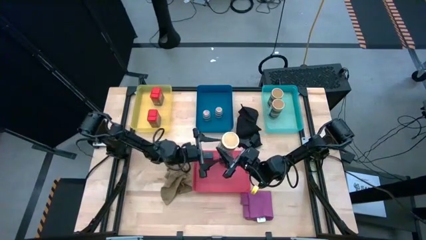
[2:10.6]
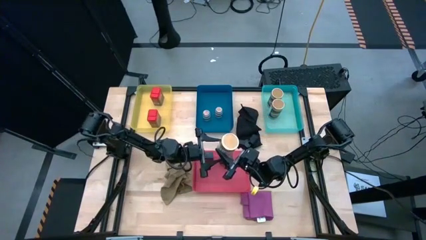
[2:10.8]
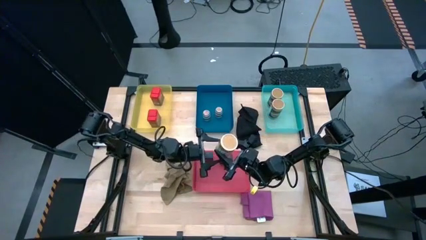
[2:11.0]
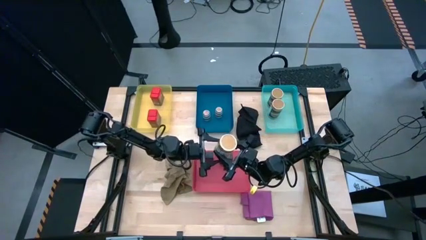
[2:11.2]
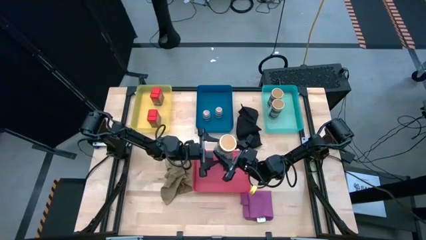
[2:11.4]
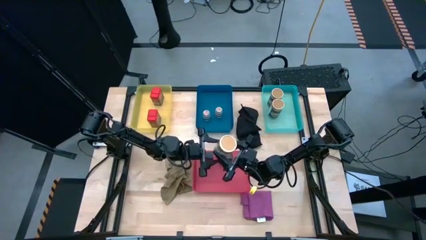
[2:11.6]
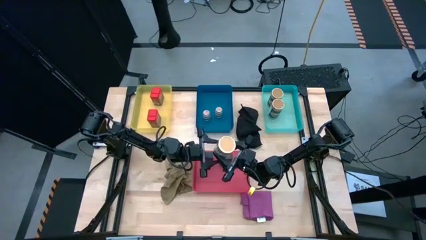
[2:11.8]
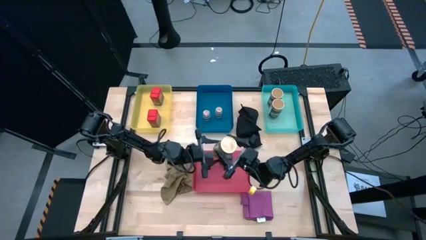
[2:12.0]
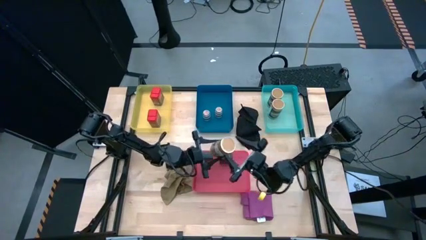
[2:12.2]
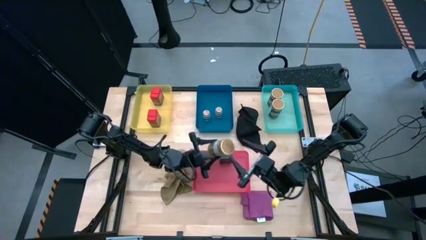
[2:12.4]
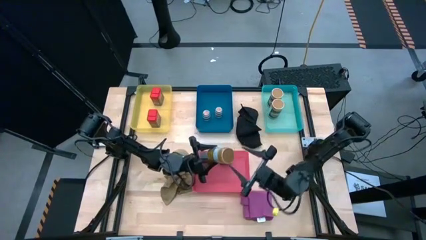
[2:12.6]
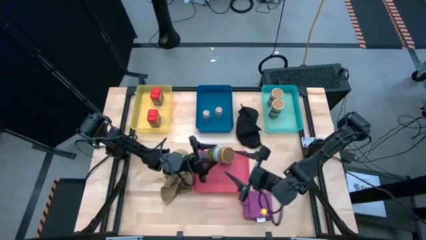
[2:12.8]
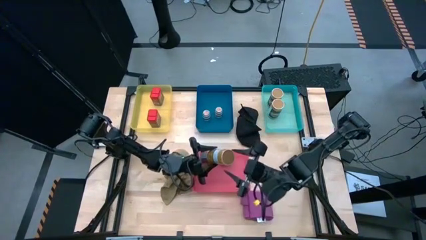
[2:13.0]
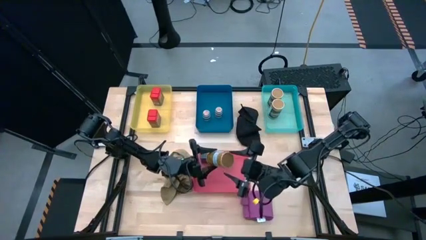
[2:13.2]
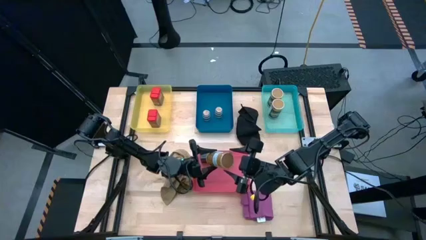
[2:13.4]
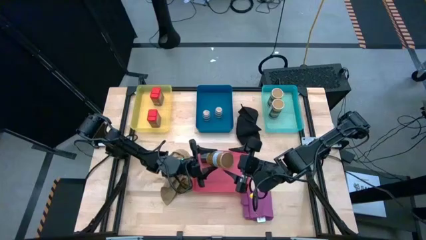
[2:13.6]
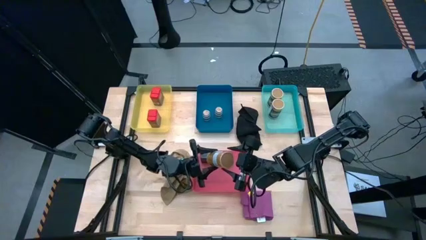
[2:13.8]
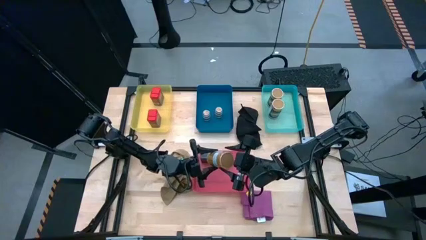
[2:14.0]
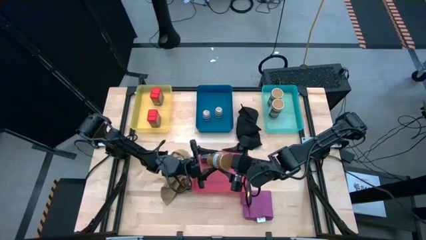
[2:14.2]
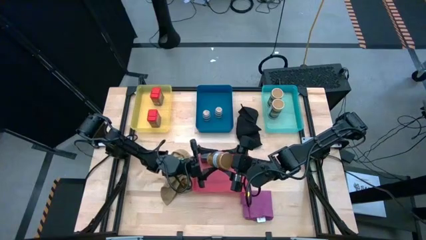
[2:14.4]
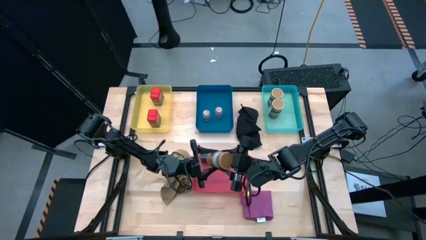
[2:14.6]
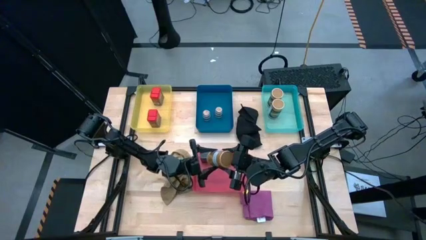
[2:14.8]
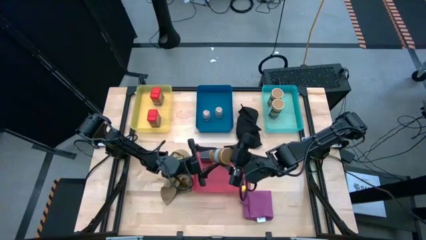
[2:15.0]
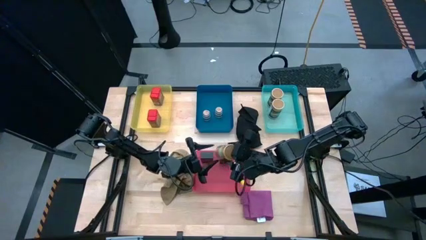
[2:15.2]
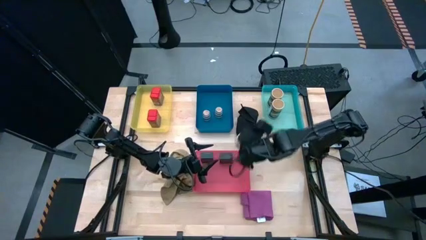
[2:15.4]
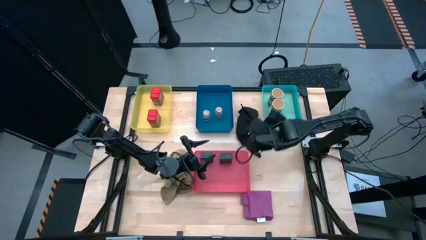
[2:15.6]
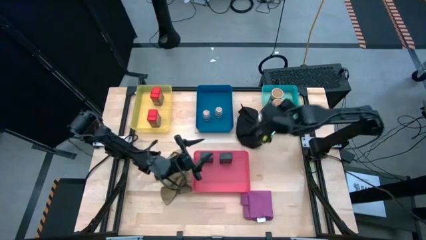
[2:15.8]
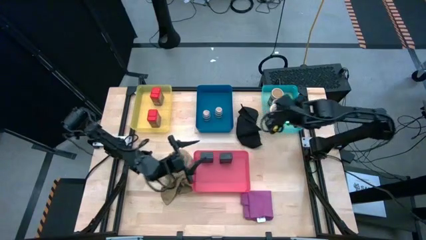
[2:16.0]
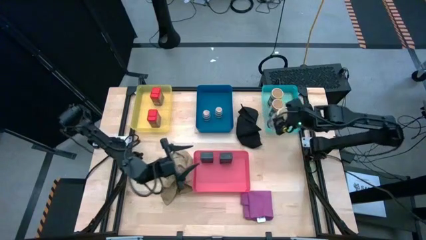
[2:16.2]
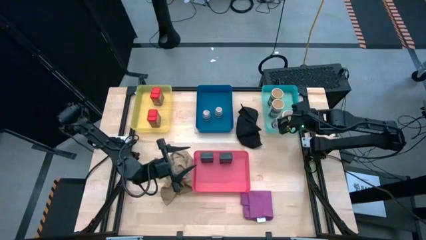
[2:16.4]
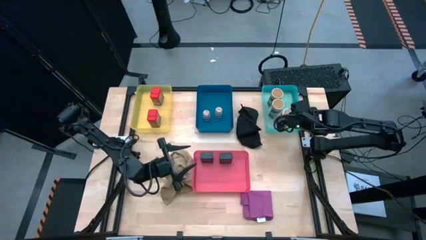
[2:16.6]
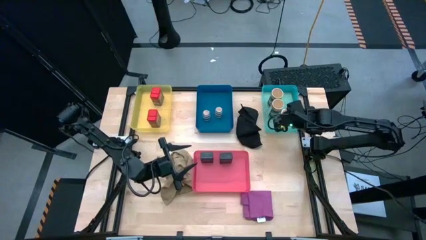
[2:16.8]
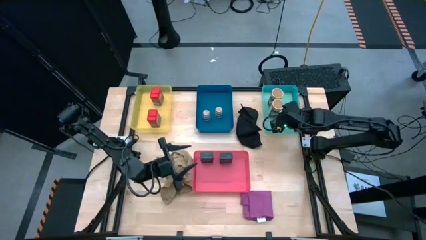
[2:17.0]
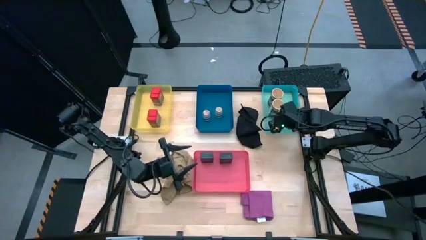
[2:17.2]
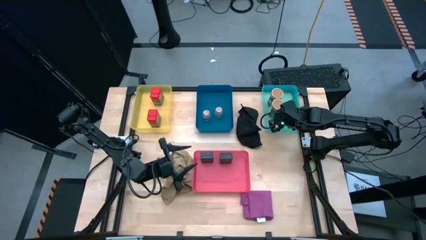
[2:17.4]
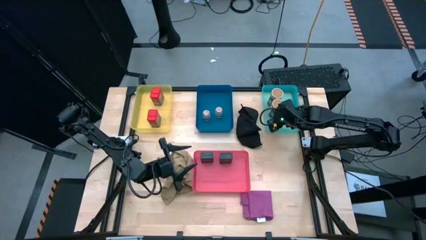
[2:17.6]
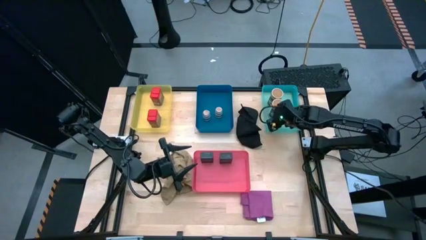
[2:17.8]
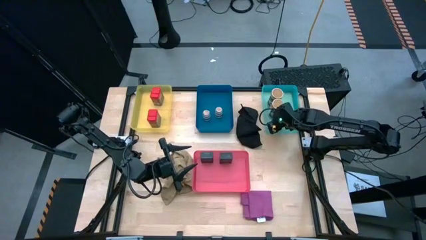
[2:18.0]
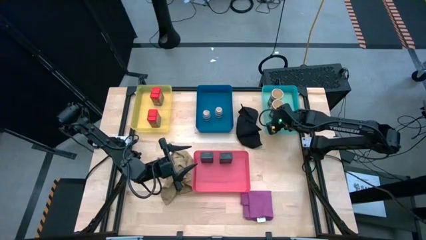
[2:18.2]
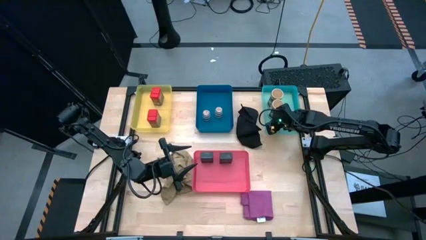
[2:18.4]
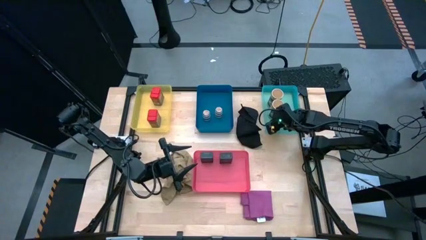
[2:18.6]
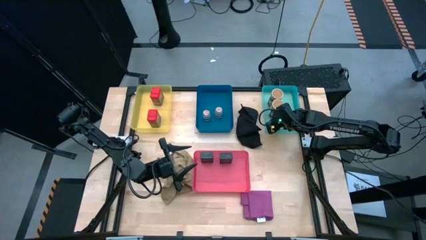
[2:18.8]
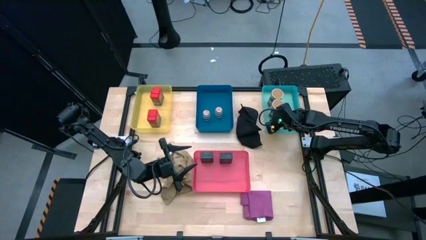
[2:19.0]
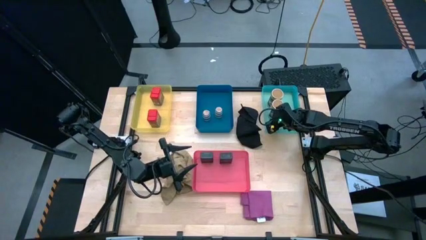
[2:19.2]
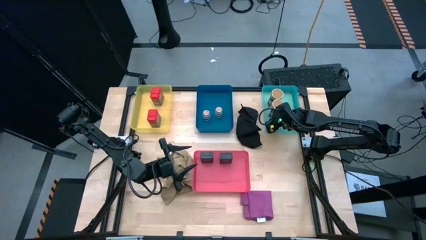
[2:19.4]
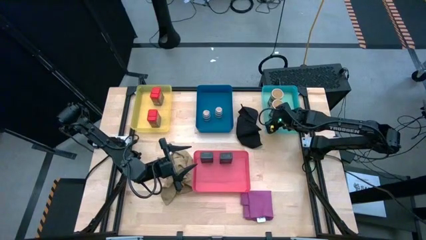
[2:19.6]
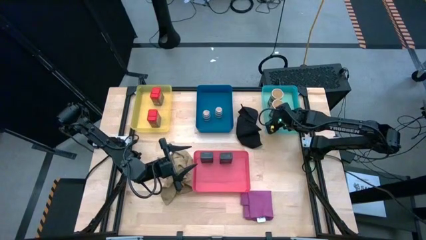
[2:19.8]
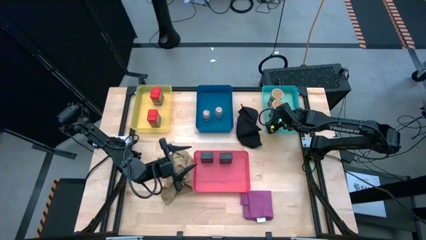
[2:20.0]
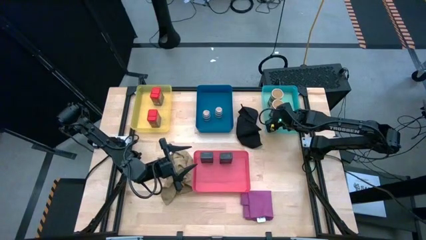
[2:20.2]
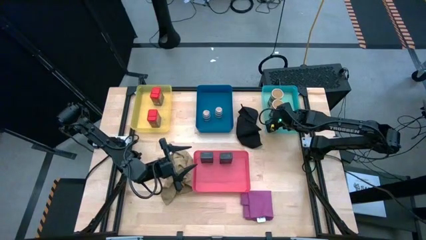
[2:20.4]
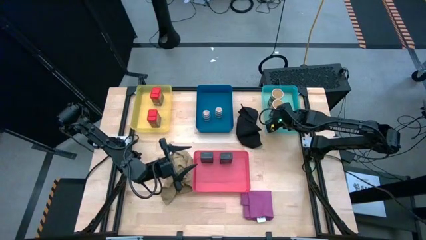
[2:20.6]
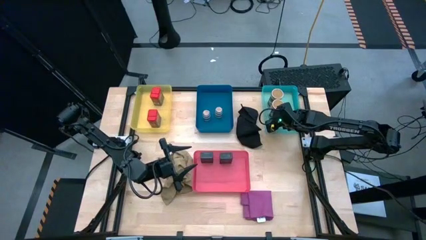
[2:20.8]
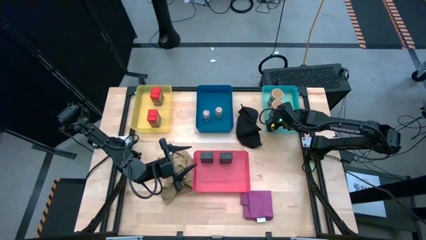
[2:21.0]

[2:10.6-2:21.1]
Task: Sort spices by type
Put the golden seasoning bottle into the light blue bin

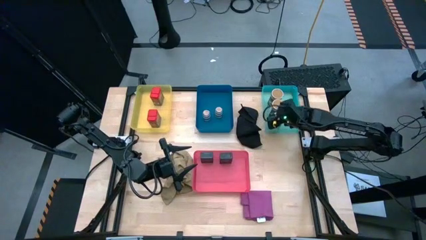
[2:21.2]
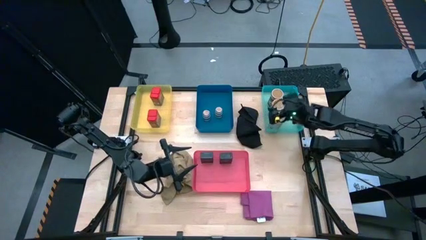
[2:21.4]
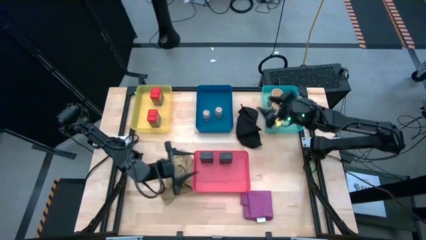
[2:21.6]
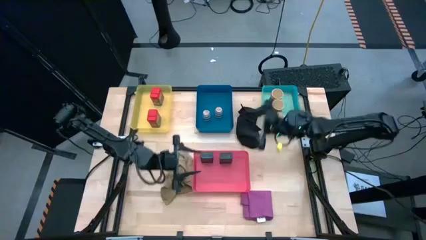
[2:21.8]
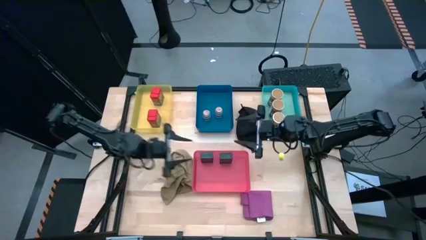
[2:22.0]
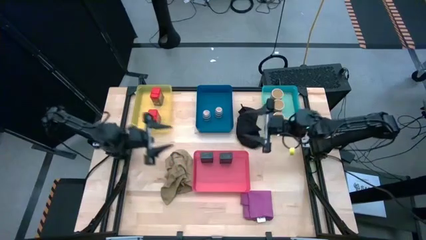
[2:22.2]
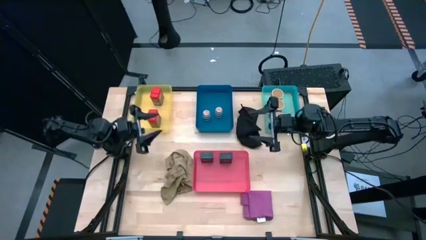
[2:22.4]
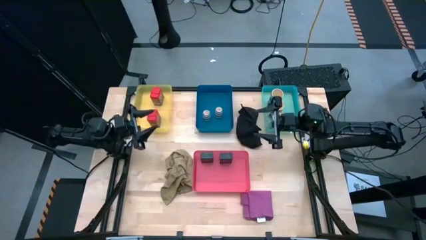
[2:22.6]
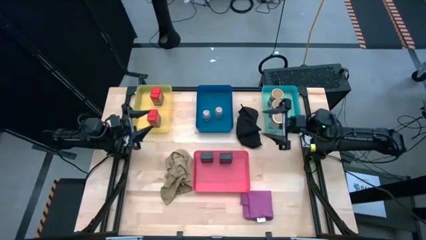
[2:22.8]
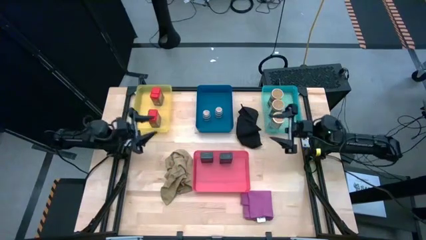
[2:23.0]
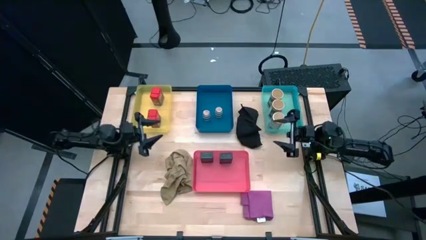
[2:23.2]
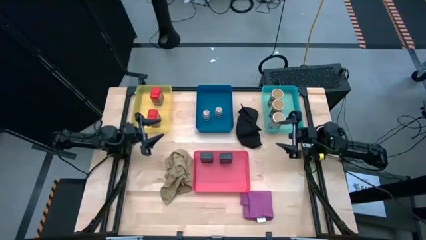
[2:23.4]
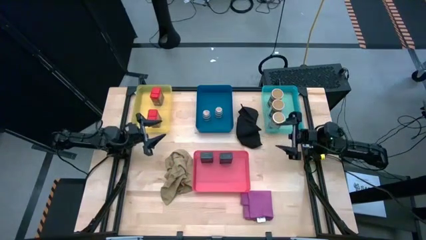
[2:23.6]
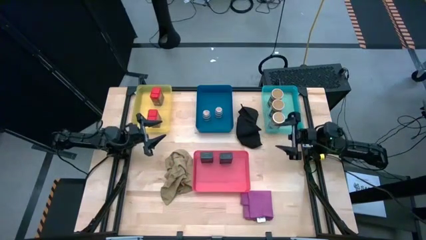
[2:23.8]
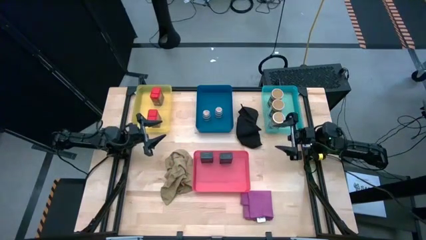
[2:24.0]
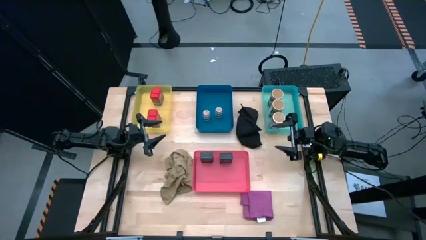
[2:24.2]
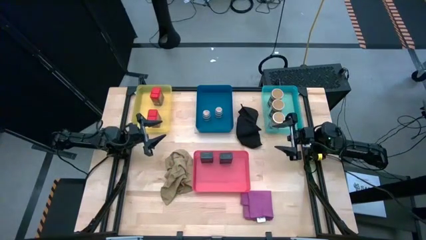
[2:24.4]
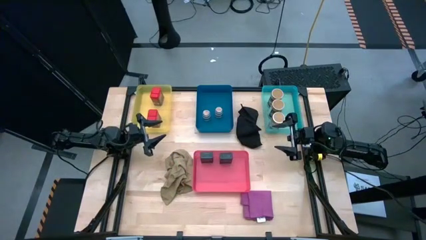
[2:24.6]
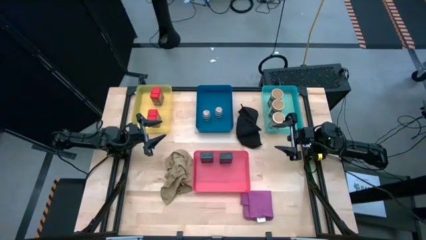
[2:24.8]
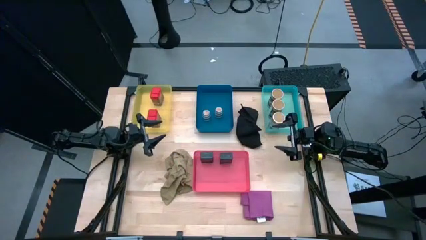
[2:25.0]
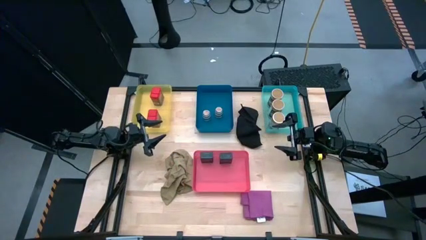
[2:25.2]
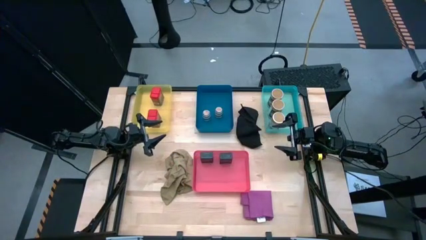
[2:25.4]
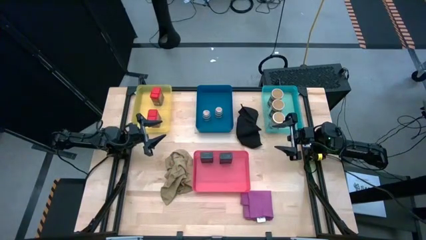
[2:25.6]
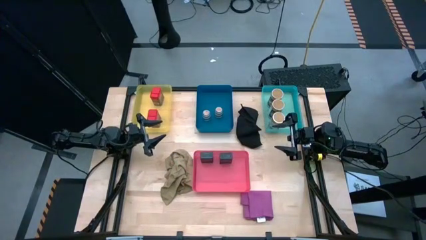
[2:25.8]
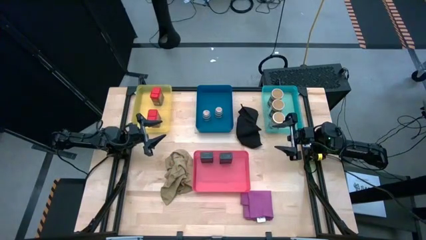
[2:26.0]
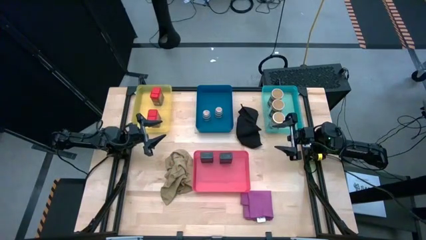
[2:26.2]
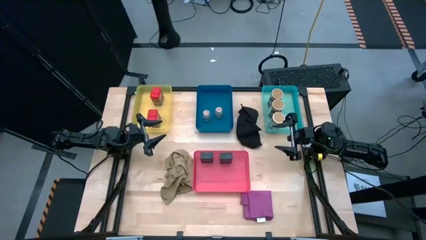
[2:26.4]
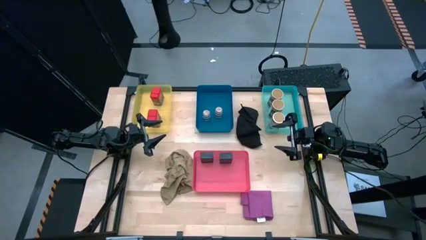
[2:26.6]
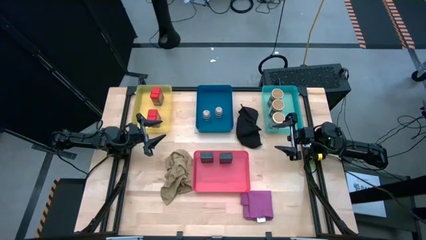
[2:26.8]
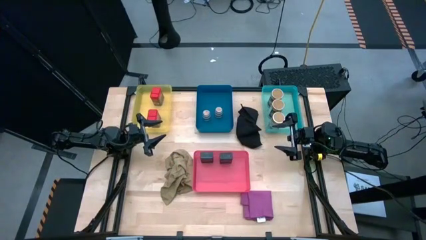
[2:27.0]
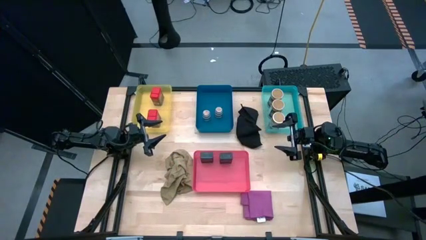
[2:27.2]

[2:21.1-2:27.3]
Return to Home Position
